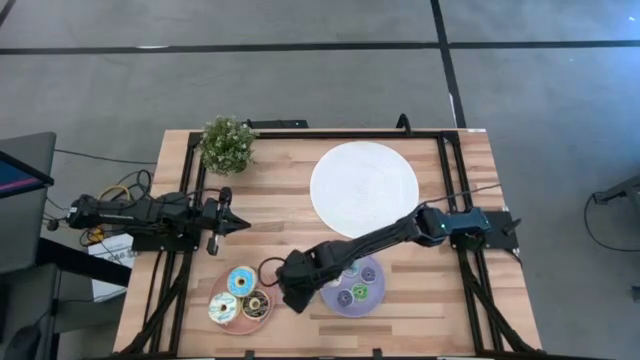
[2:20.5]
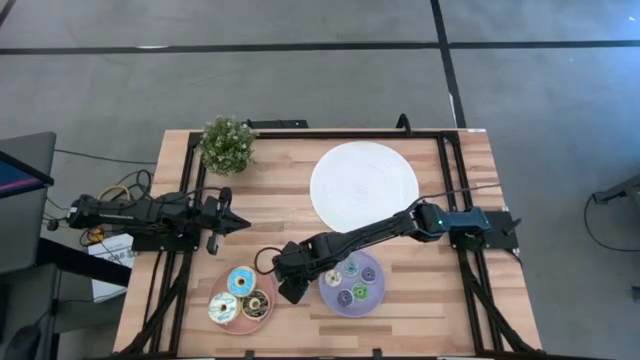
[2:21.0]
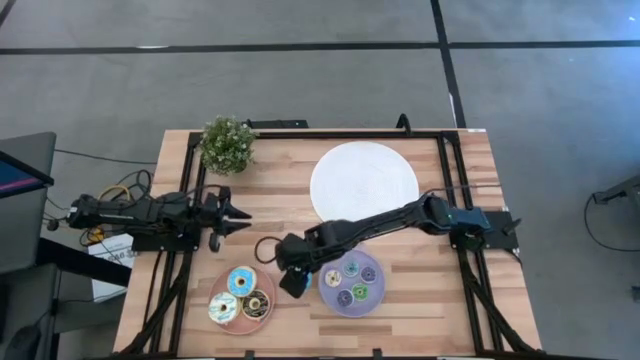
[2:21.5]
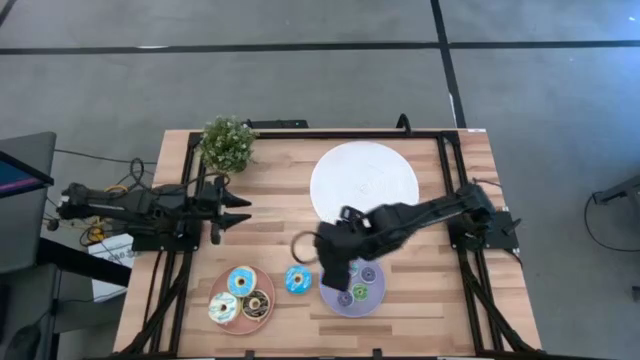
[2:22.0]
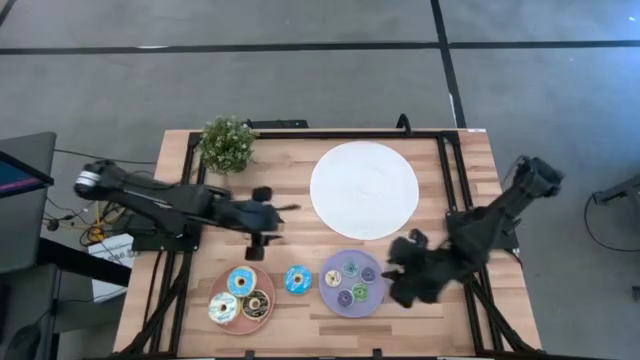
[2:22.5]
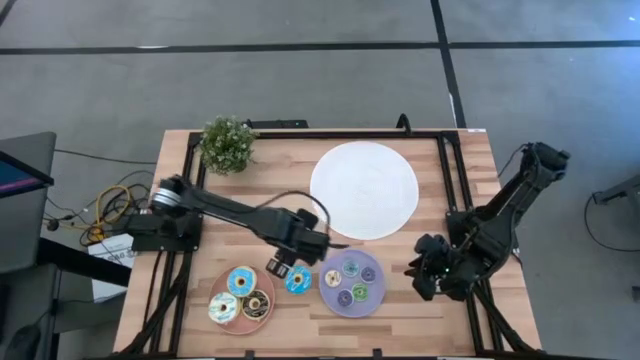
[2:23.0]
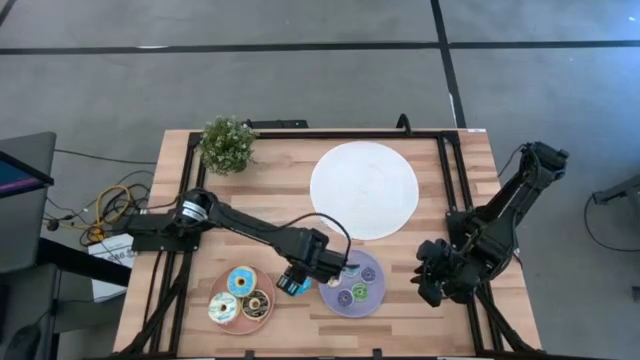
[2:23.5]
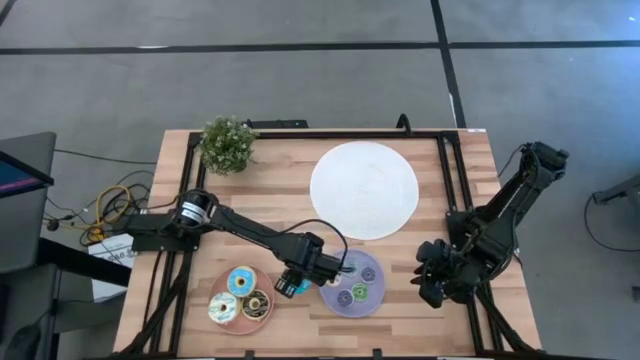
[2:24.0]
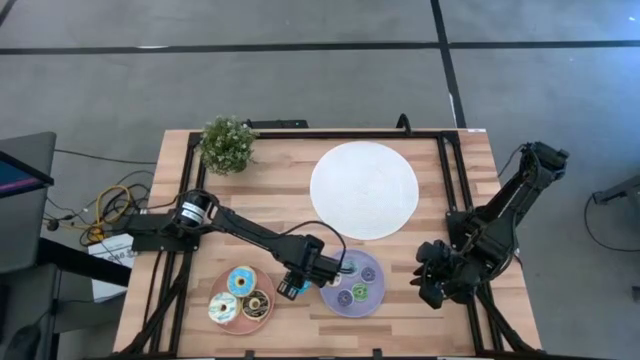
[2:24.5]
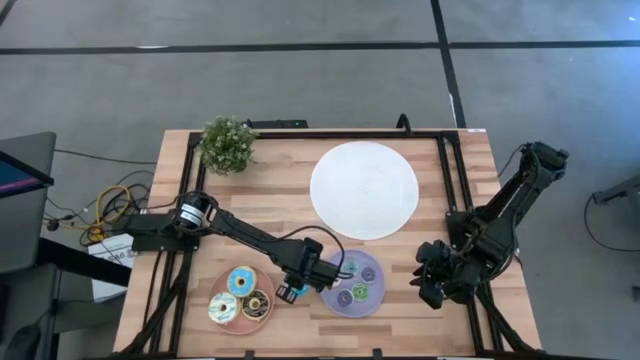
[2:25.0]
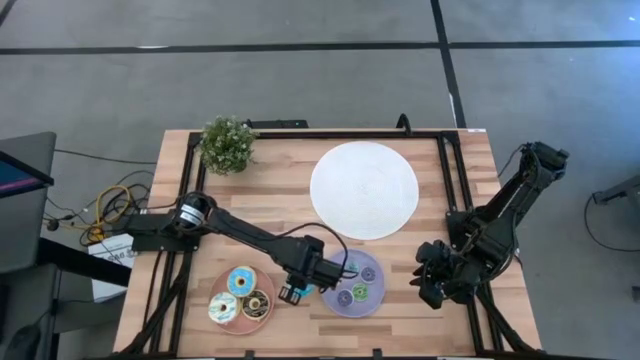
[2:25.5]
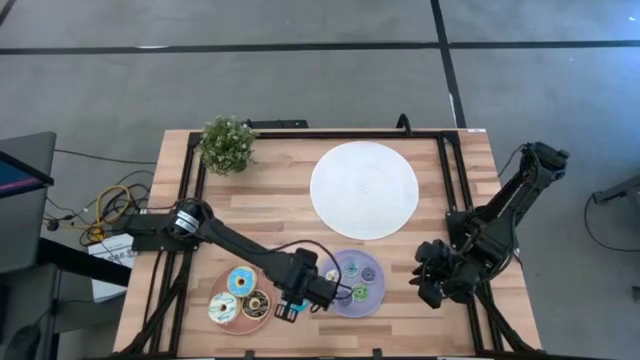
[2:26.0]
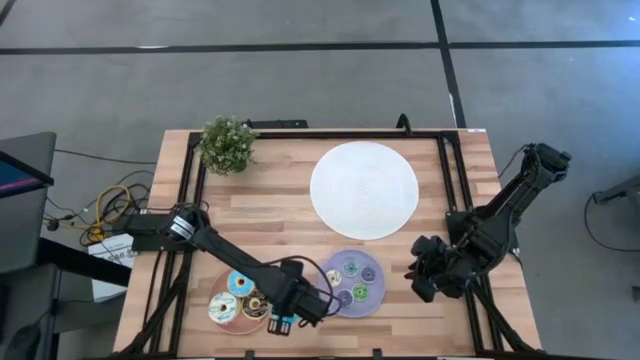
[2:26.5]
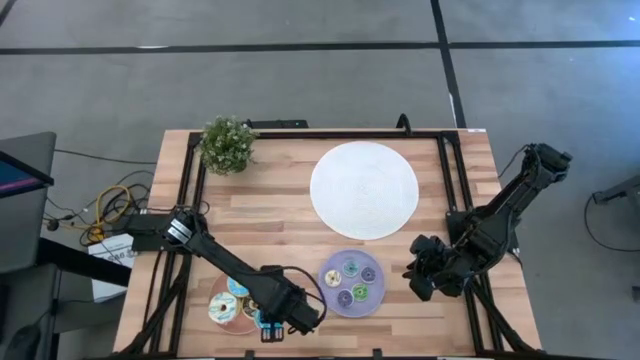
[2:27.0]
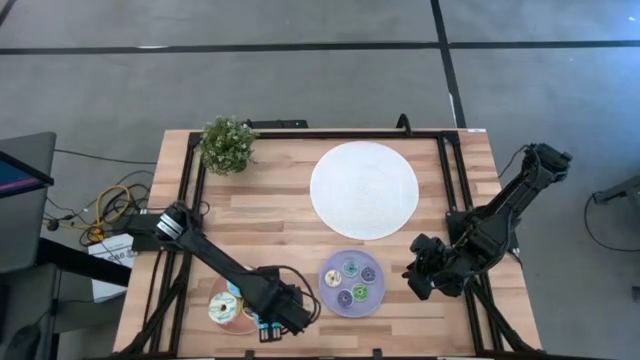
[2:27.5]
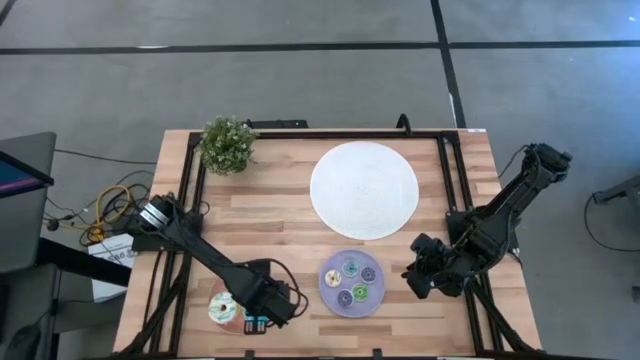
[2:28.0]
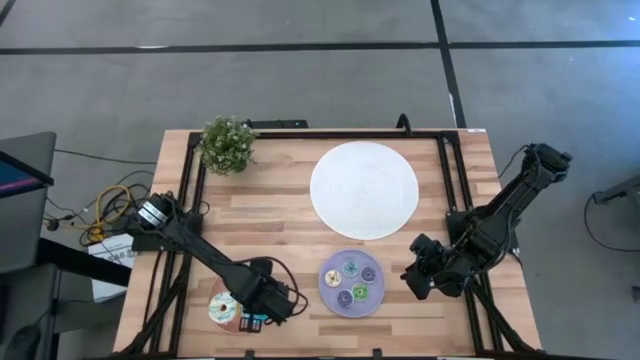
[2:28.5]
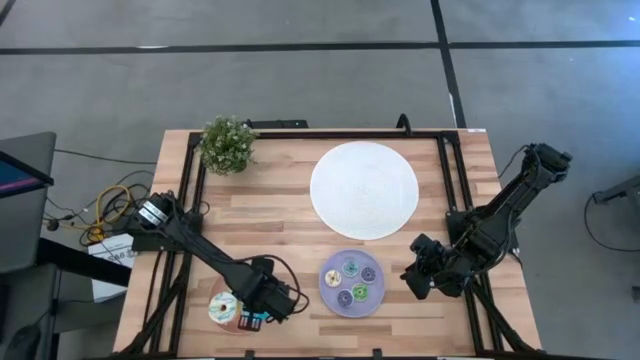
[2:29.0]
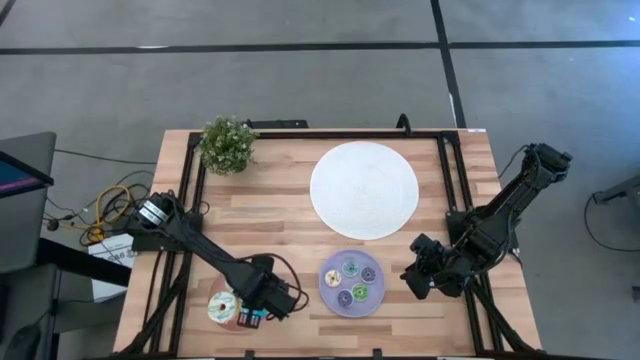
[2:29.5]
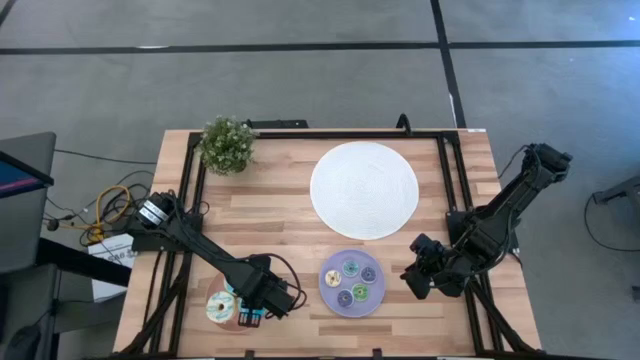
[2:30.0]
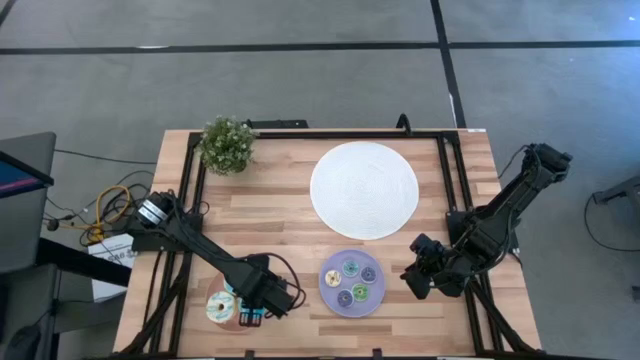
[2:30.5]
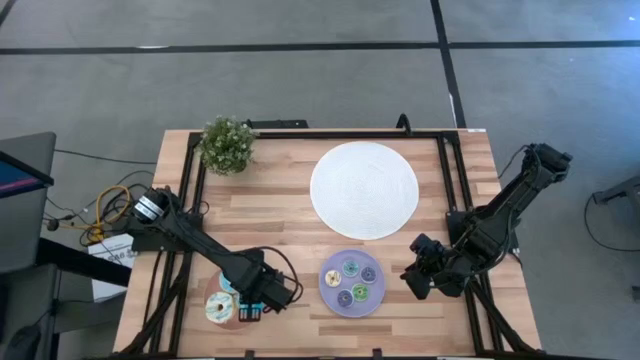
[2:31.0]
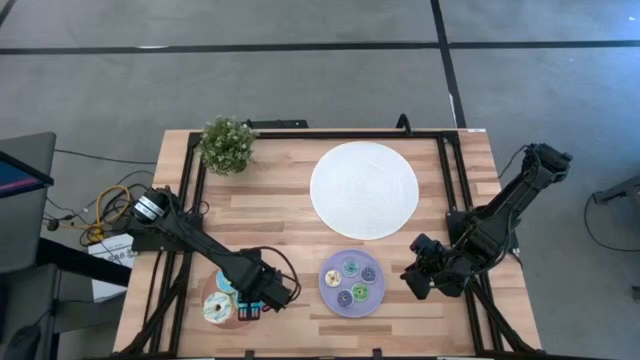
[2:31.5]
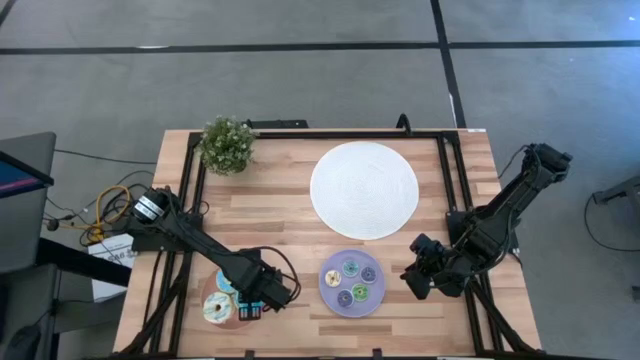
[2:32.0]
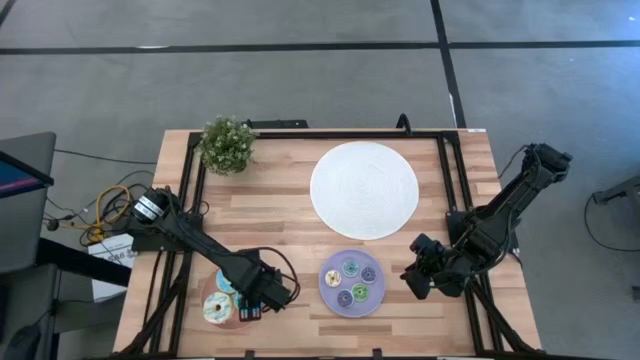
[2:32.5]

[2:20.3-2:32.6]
Task: Pick & Place donuts
Put the big light blue donut on the pink plate

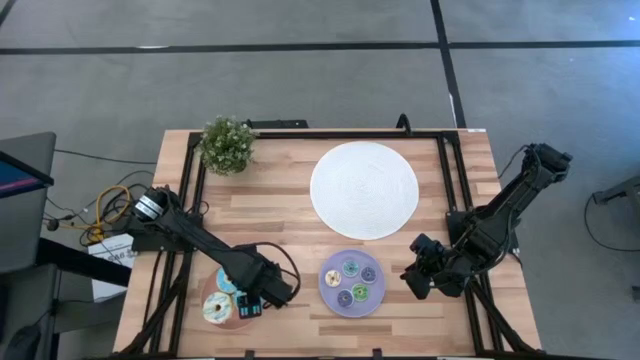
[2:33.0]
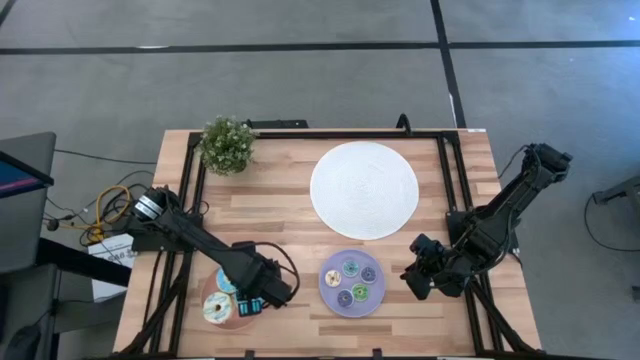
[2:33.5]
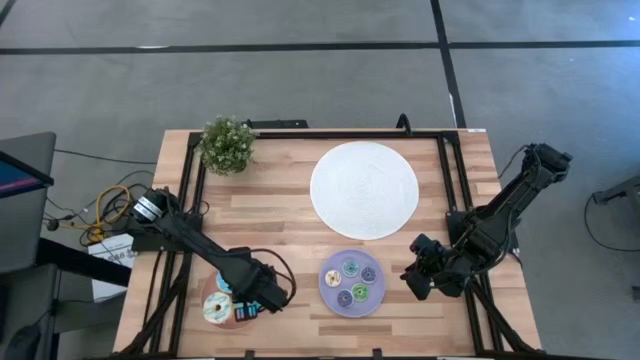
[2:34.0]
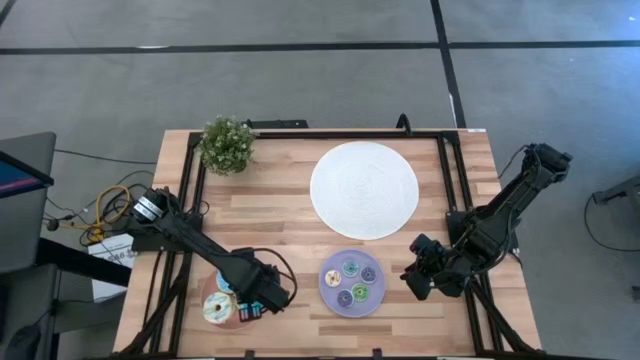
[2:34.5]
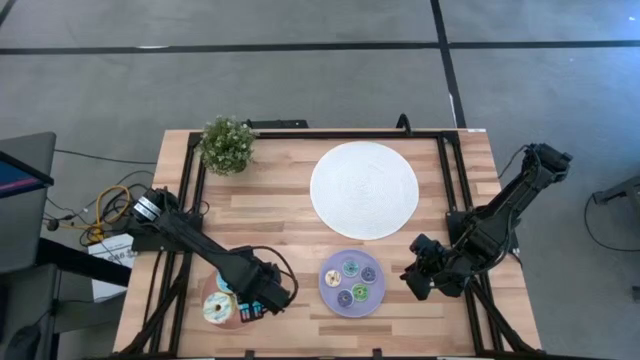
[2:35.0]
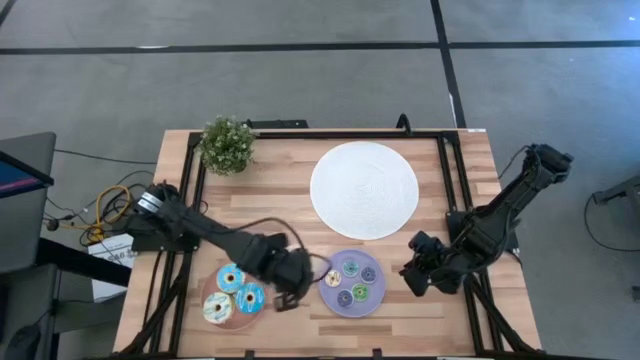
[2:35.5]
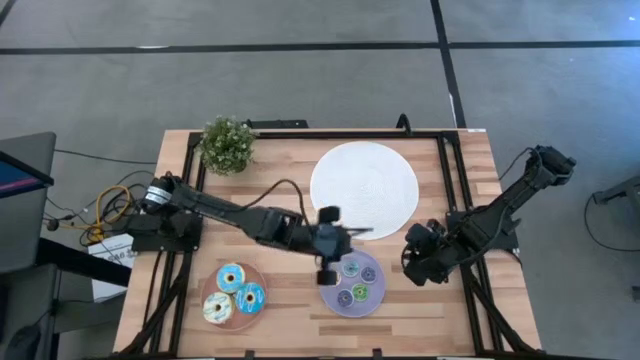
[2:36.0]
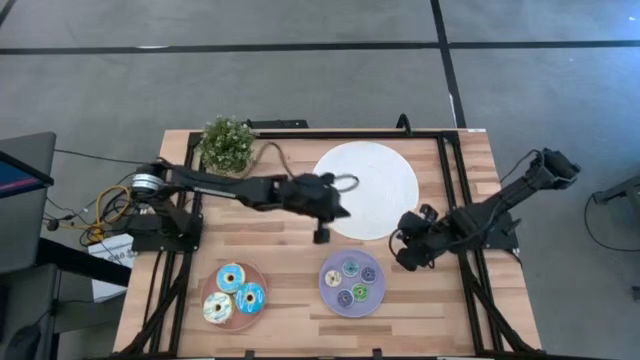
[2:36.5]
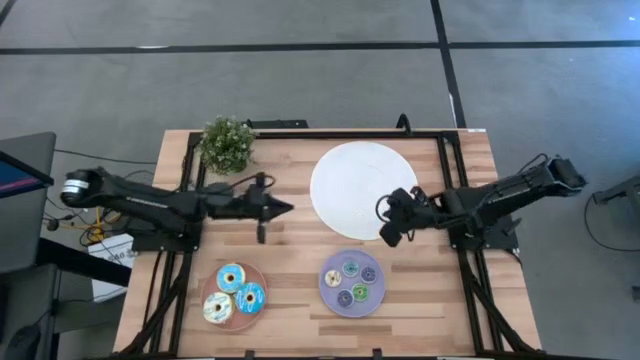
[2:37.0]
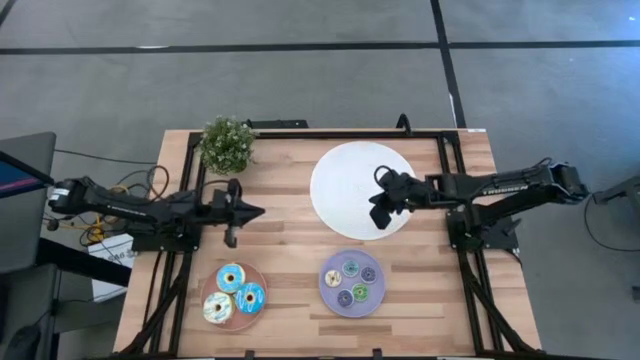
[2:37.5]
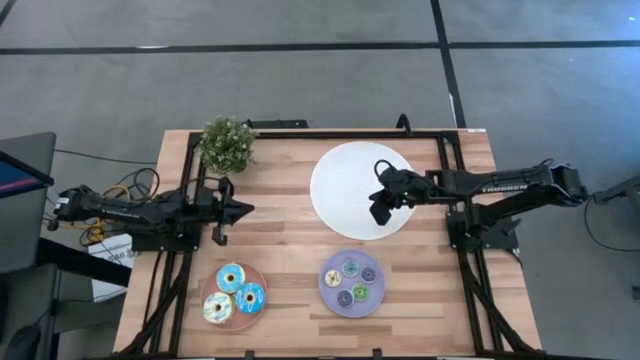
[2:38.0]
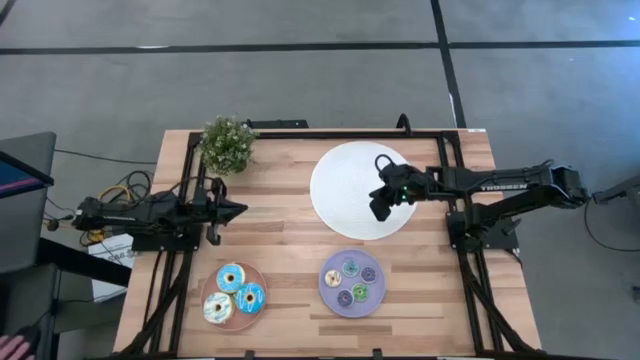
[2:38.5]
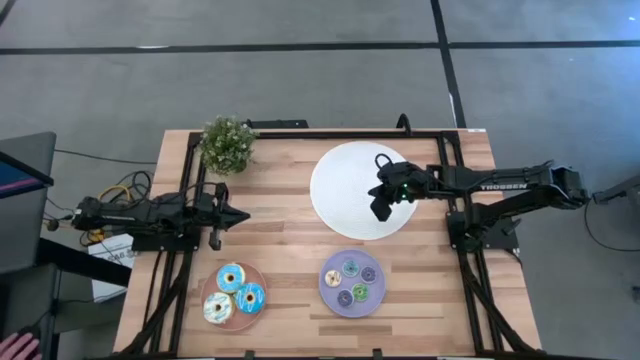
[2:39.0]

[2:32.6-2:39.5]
Return to Home Position
